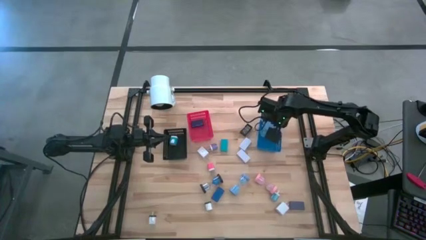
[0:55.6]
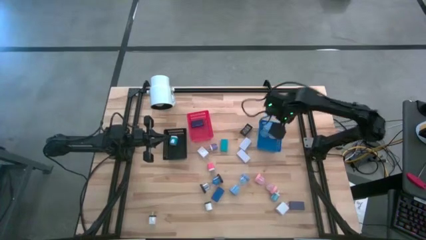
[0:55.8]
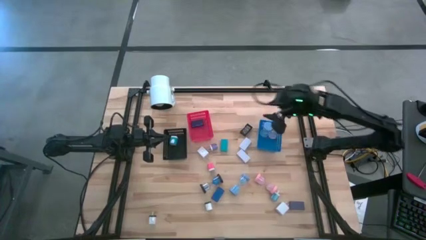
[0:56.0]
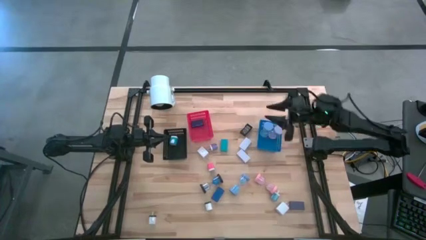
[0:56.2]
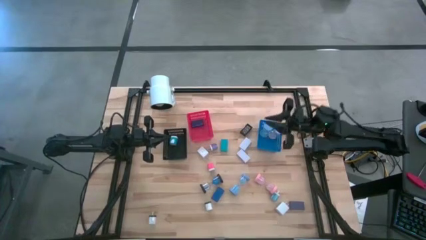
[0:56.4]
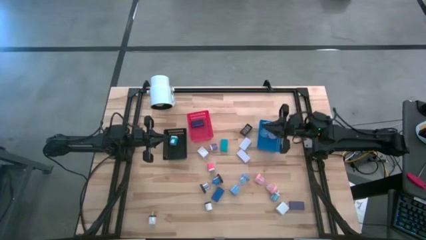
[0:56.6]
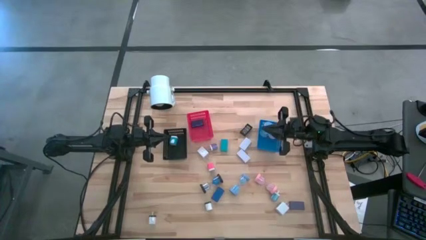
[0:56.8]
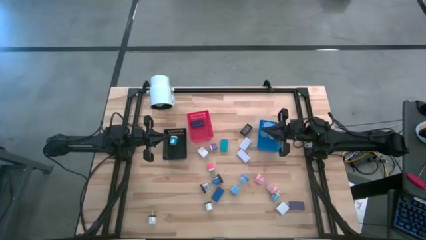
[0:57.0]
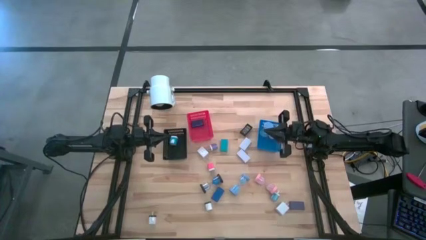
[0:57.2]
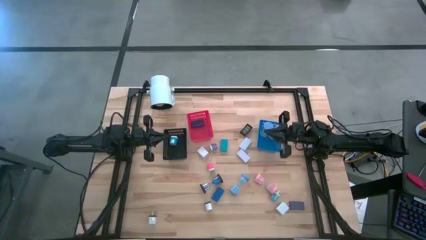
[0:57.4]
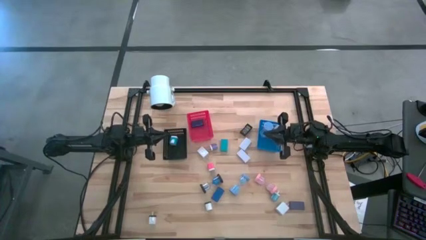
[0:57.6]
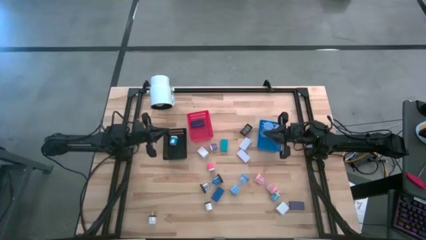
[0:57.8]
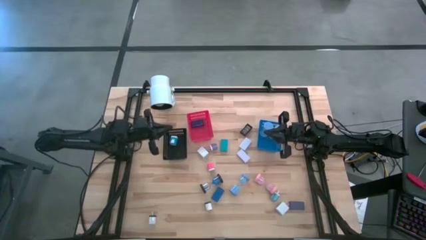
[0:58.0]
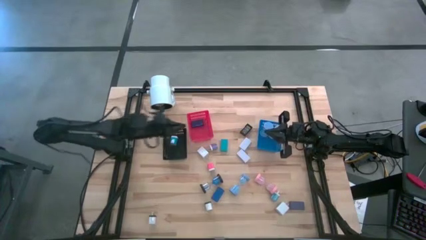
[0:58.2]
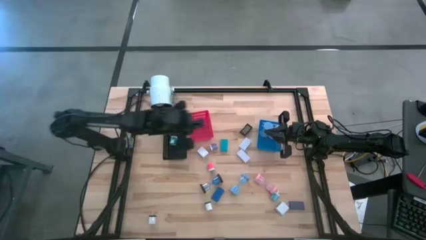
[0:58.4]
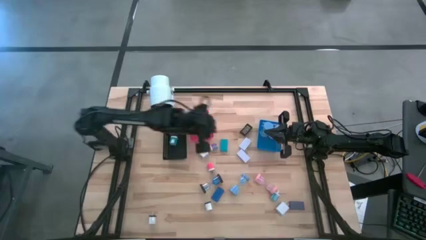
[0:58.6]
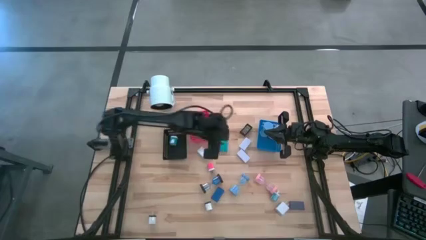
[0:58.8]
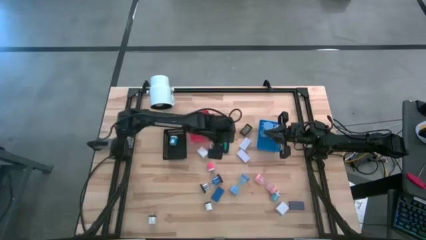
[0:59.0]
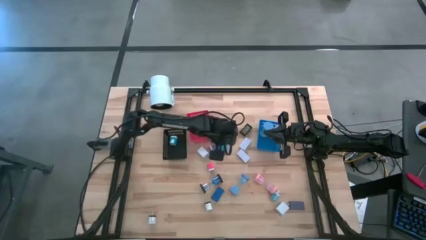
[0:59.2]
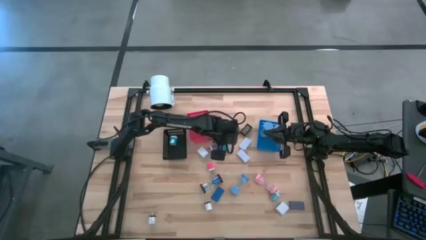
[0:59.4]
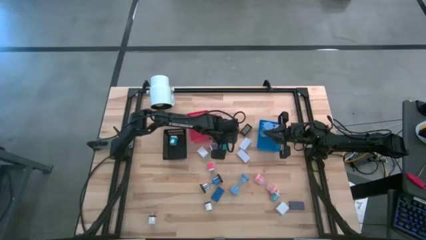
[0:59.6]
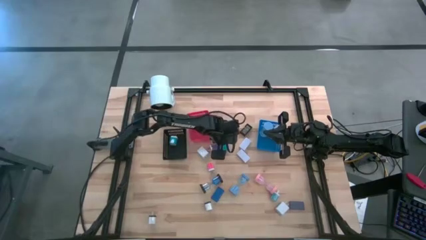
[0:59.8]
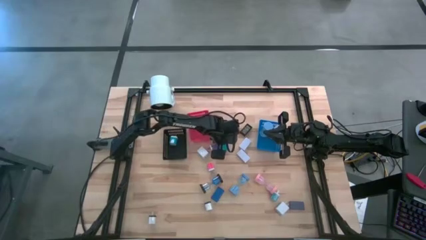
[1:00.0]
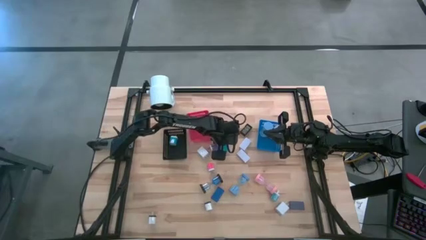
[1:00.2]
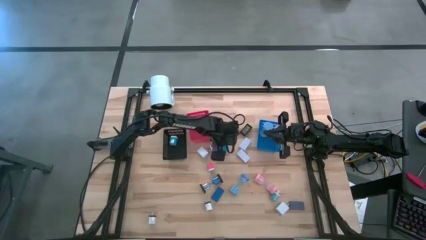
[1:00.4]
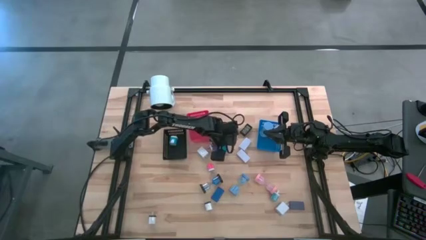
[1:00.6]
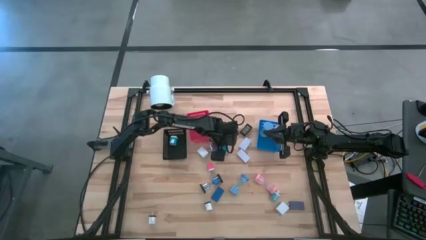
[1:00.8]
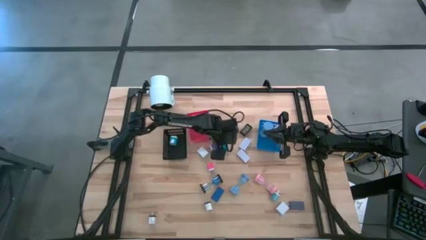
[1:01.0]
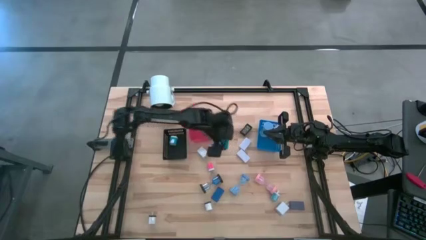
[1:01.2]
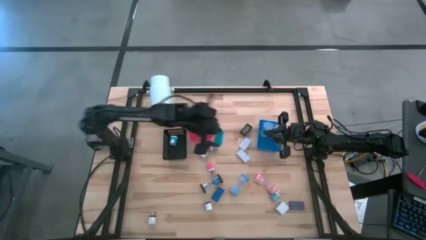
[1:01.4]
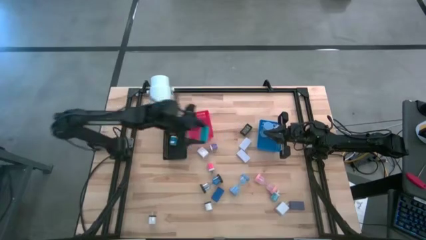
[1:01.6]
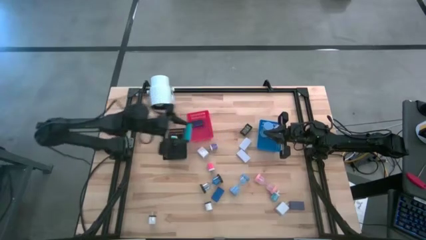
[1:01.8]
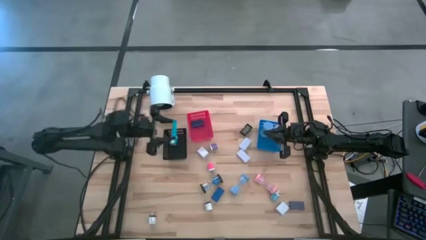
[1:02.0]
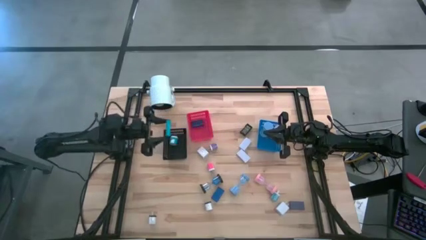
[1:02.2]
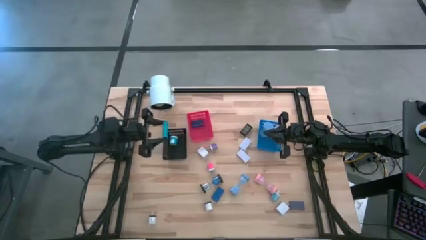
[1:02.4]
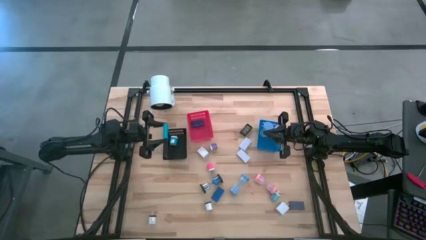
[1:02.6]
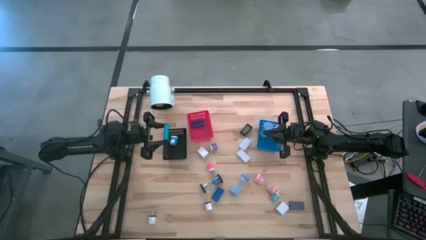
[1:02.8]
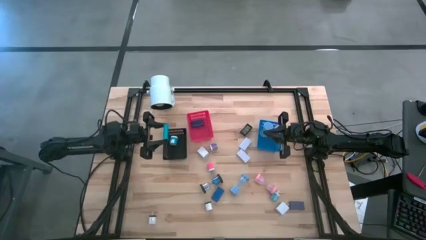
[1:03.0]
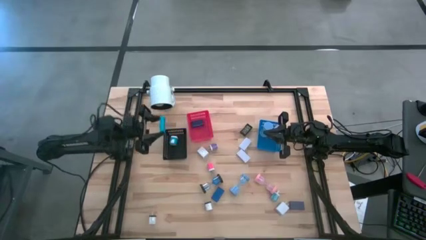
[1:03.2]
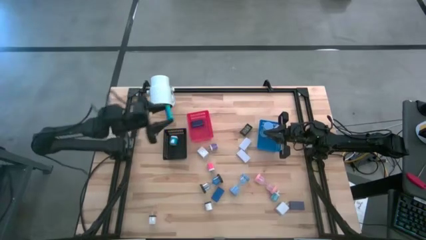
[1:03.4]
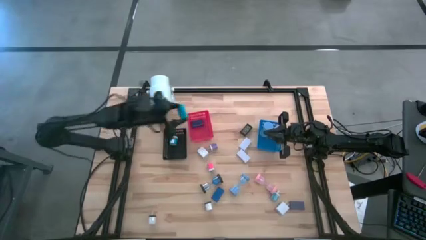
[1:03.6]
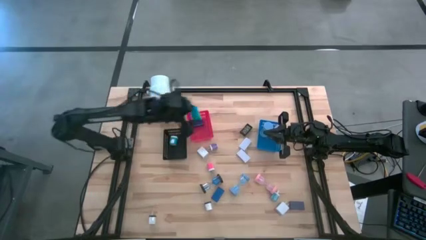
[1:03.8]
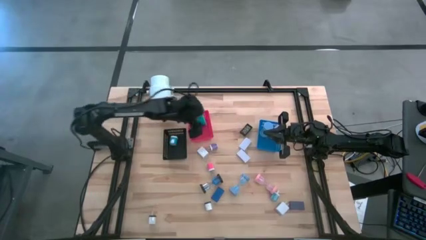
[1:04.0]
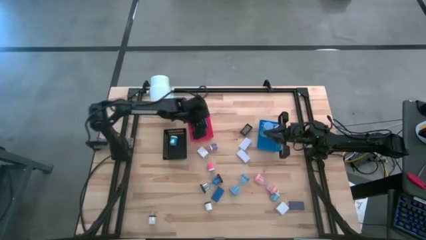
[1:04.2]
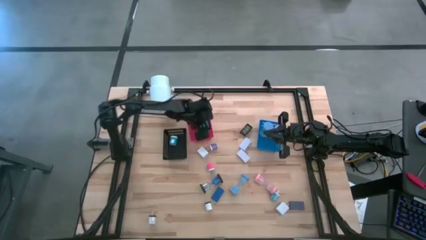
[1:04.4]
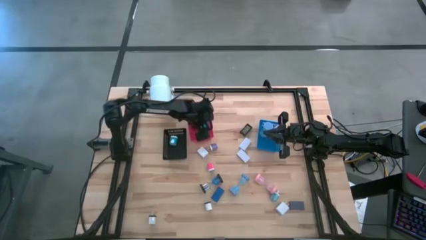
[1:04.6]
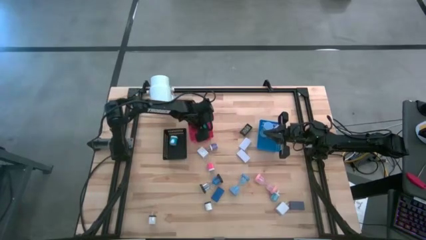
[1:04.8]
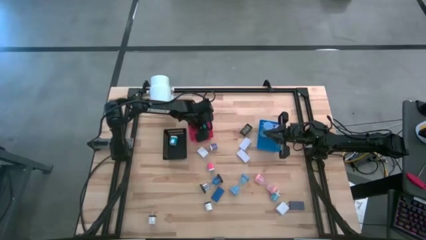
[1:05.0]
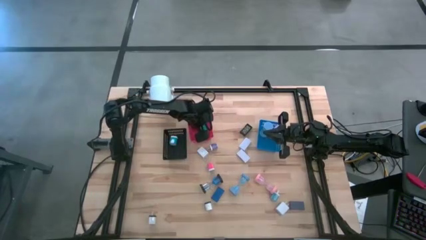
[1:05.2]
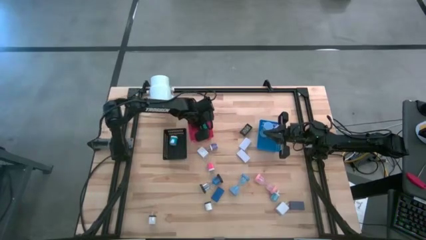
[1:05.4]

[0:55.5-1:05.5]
Task: Pick & Place Office items
Put the light blue digital clock into the red bin

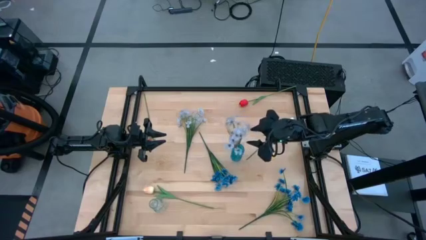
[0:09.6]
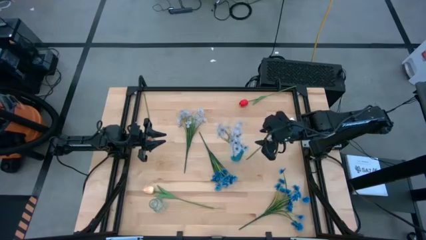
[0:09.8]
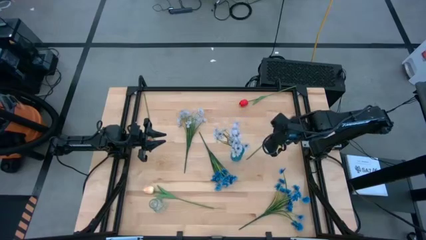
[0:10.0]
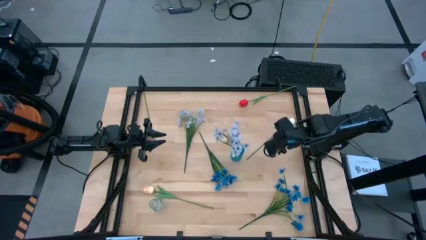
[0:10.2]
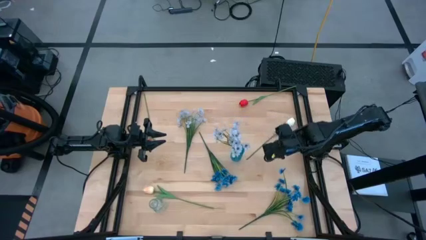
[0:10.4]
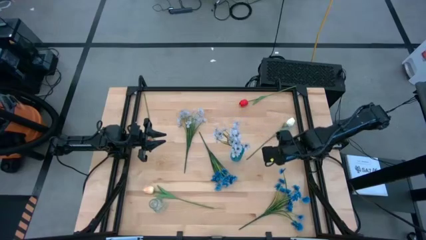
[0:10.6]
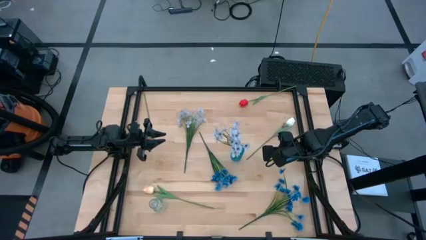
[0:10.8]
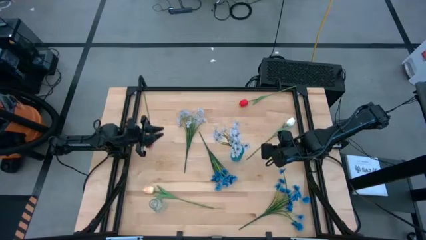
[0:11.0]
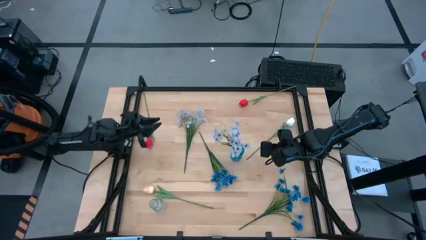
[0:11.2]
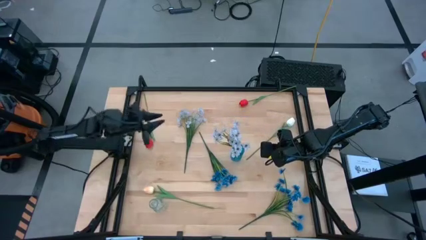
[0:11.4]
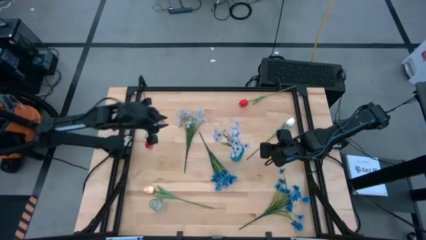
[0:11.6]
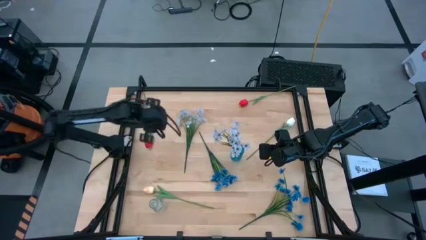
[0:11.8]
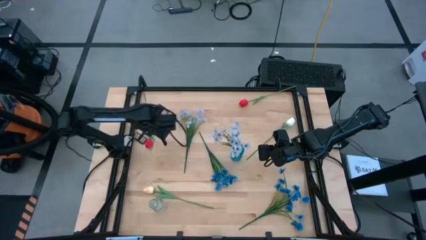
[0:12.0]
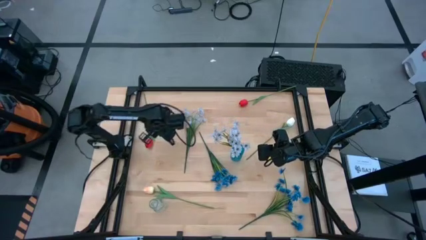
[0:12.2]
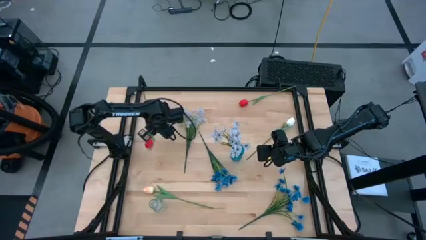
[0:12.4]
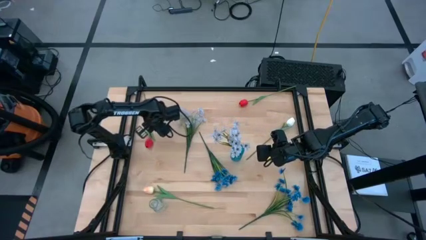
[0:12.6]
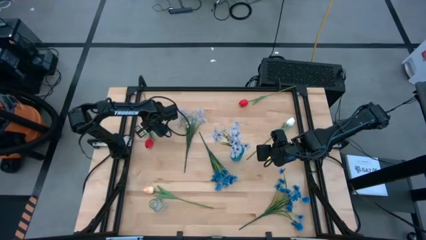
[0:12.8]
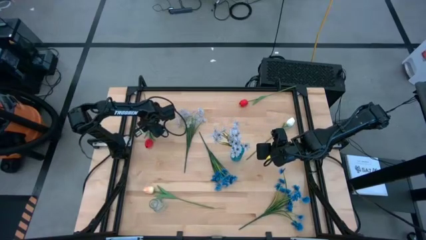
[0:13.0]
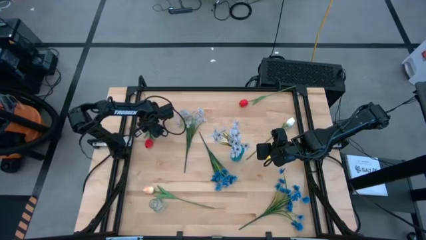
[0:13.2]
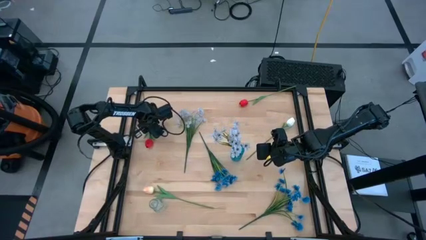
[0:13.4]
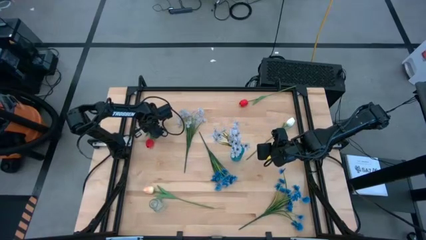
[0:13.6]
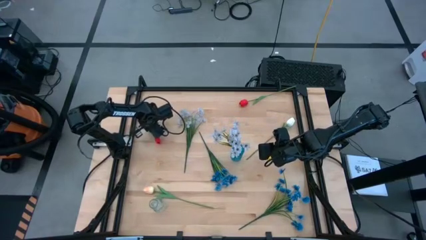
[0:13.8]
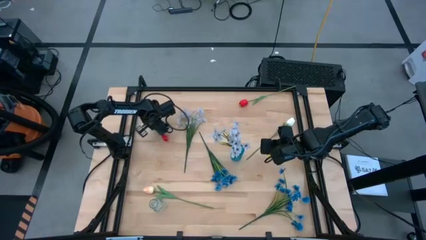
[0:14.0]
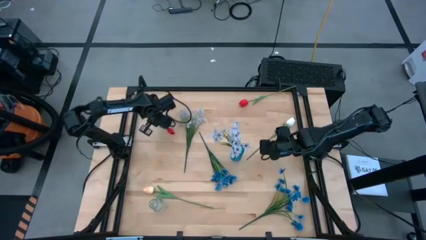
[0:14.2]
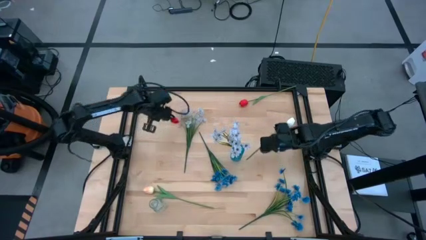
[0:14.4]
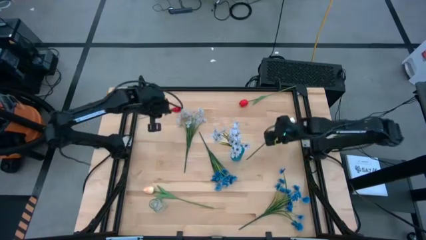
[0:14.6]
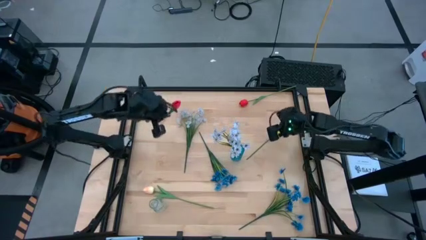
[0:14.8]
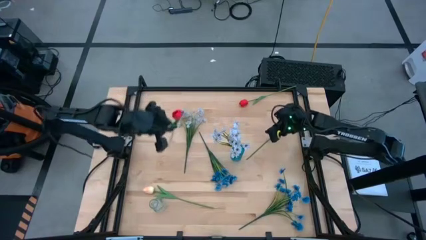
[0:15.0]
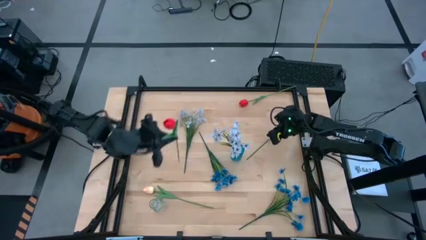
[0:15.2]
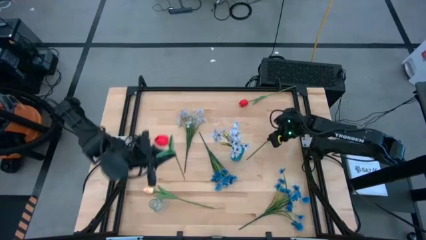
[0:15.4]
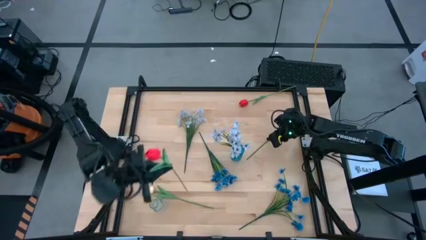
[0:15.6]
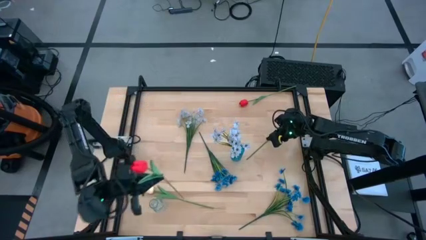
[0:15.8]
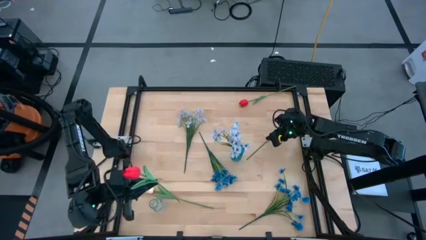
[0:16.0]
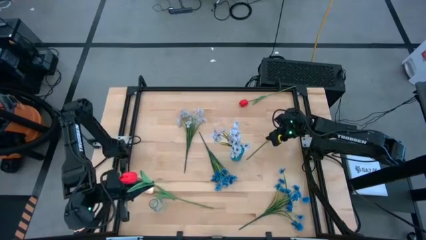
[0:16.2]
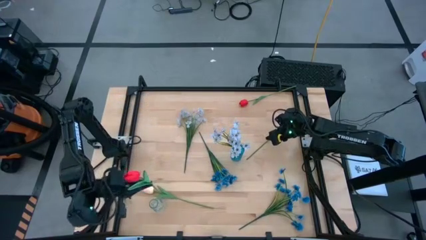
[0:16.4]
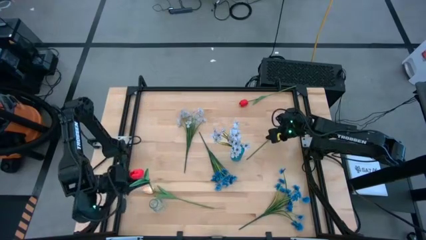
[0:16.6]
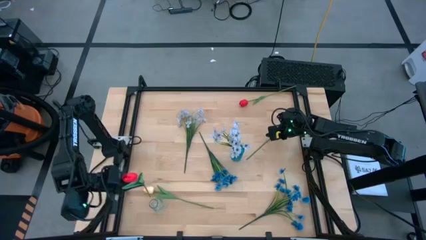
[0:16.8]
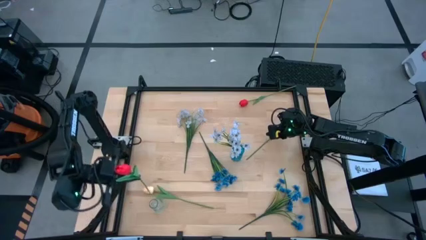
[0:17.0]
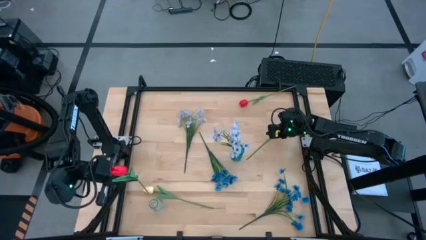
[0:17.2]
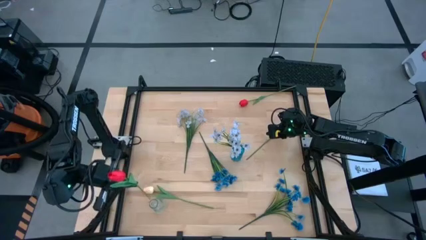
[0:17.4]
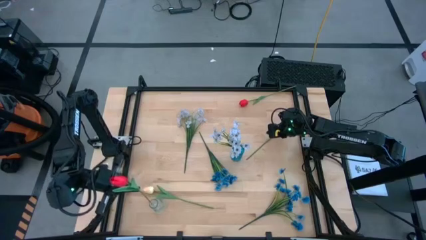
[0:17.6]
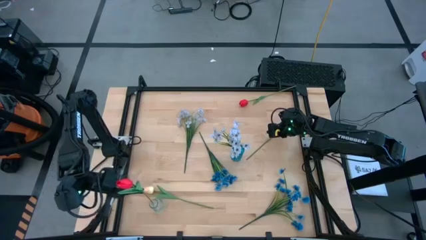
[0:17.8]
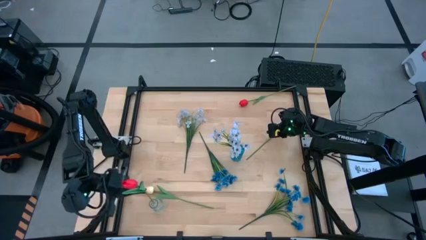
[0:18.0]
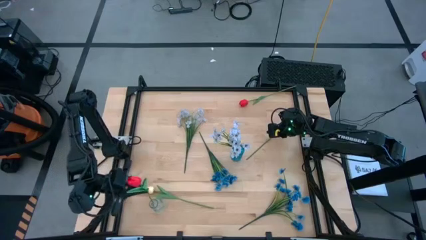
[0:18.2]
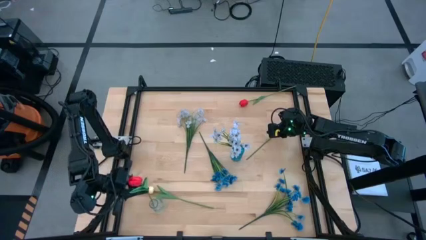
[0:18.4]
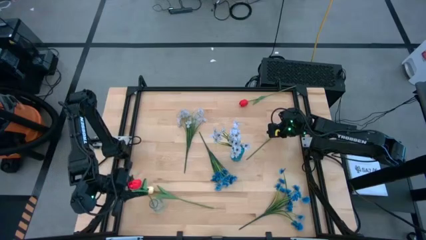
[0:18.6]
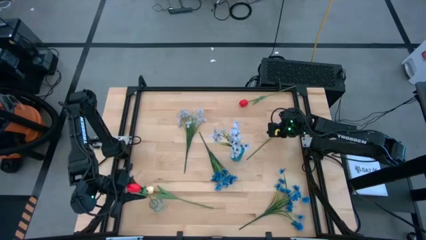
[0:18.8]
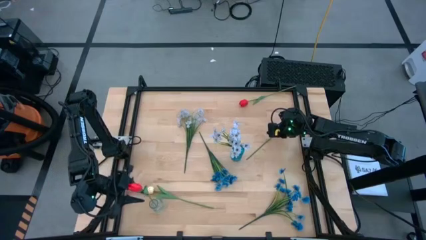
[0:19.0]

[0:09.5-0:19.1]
Task: Sort flowers into vase by color
Put the left red flower into the transparent flower vase
